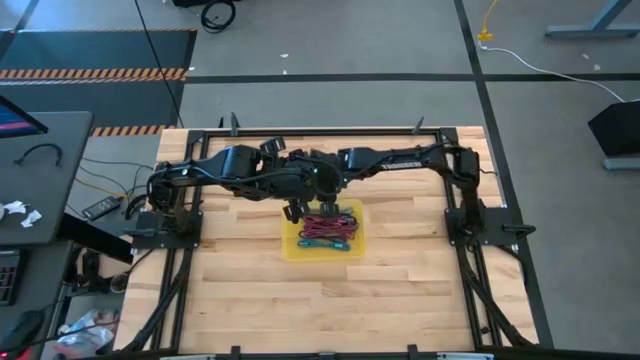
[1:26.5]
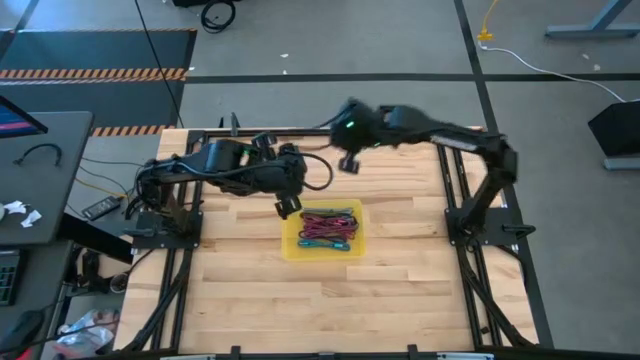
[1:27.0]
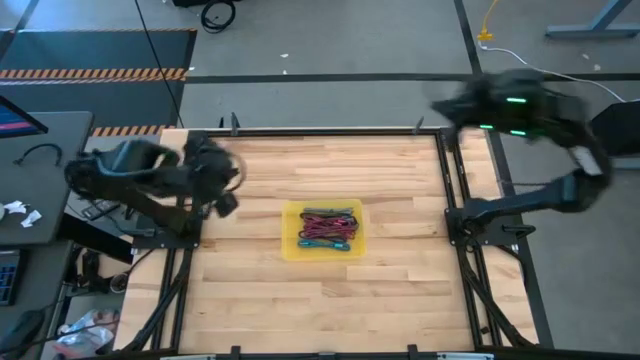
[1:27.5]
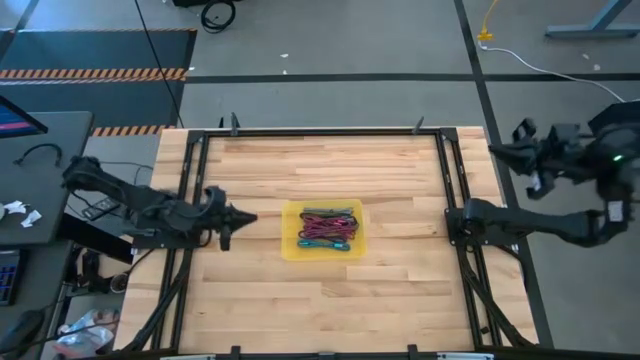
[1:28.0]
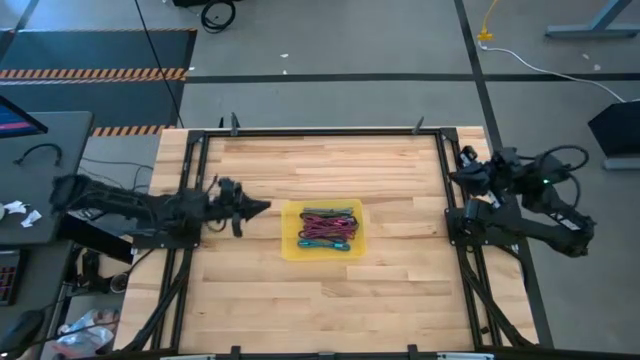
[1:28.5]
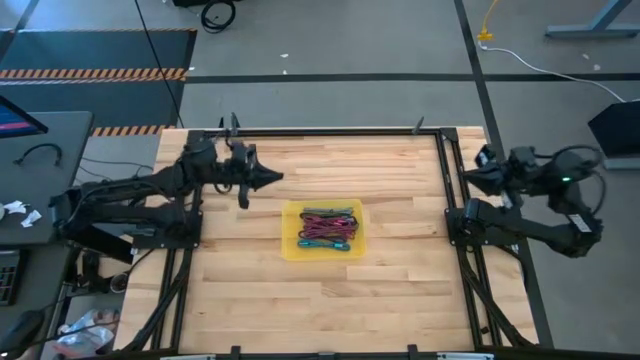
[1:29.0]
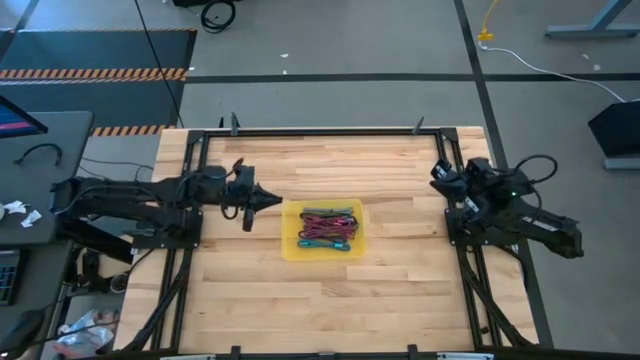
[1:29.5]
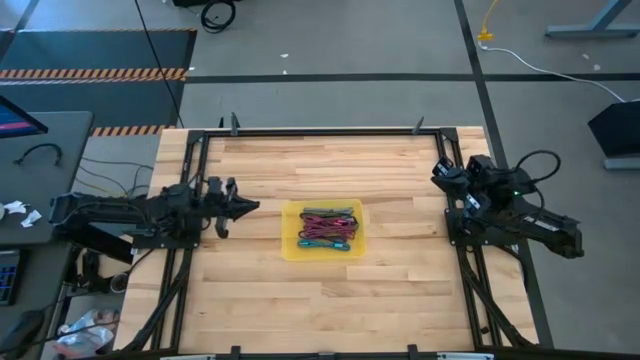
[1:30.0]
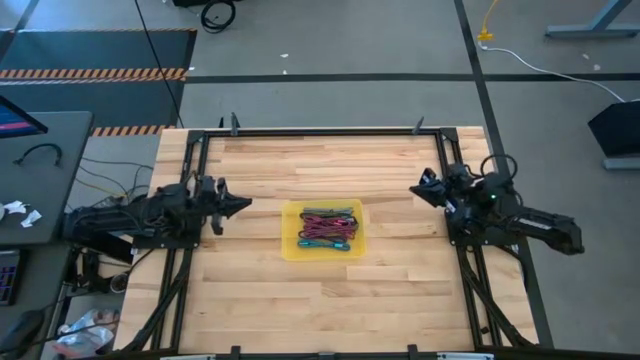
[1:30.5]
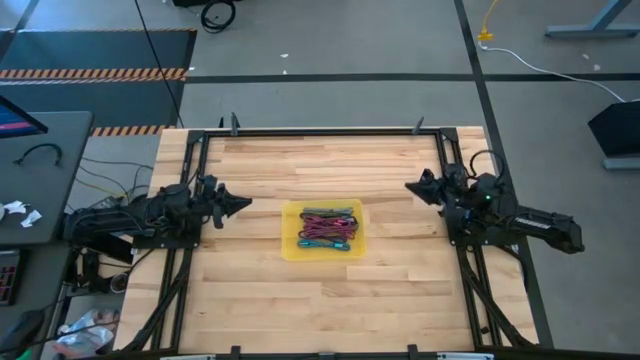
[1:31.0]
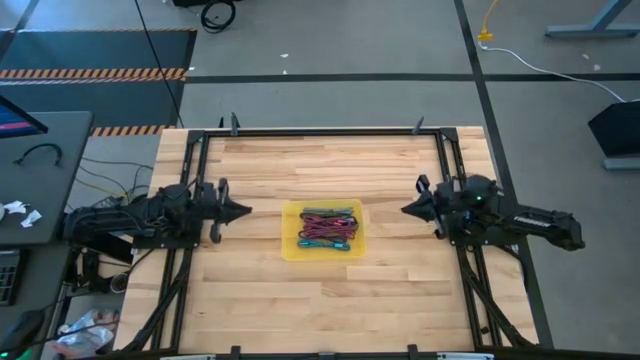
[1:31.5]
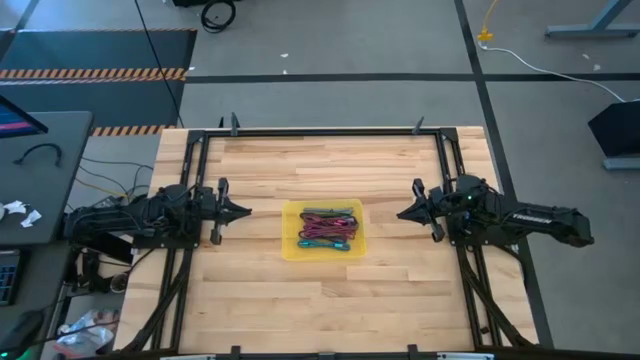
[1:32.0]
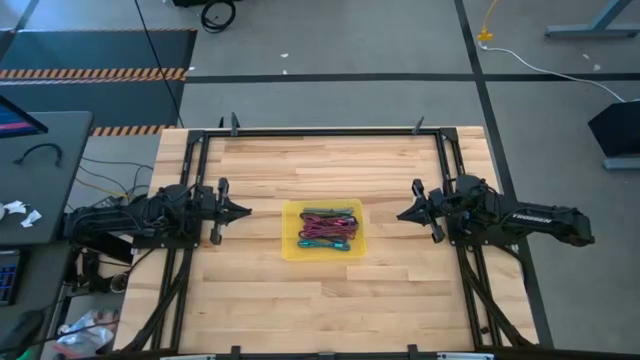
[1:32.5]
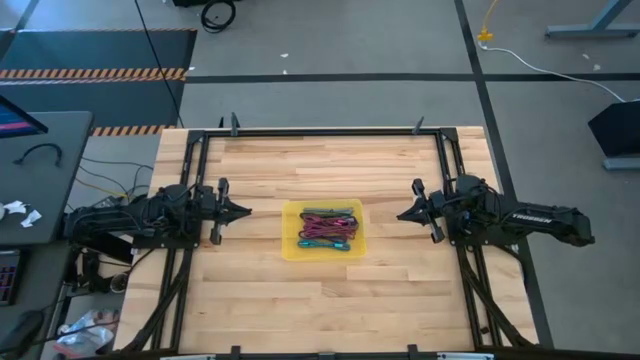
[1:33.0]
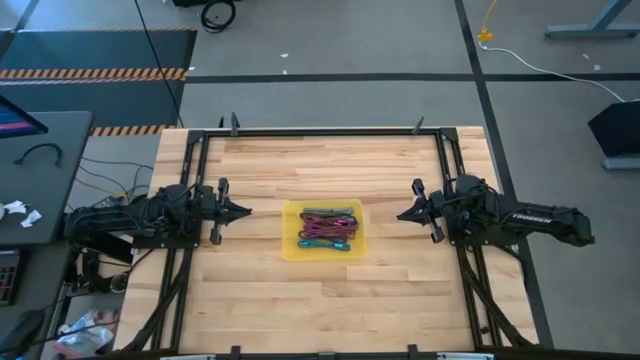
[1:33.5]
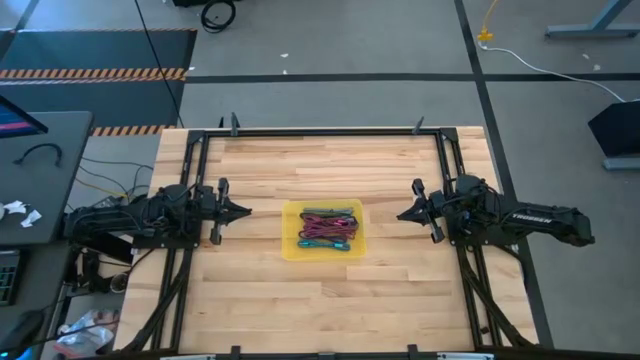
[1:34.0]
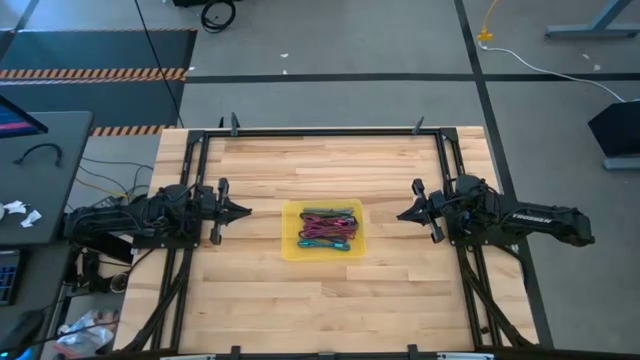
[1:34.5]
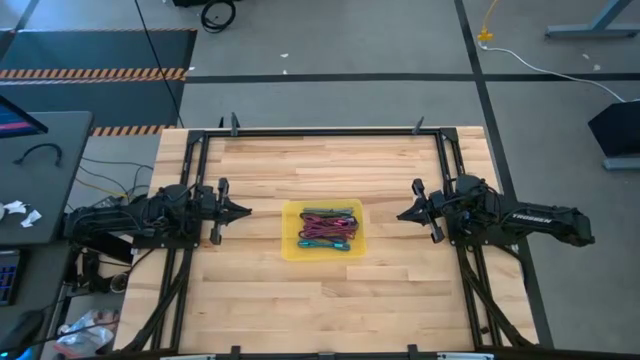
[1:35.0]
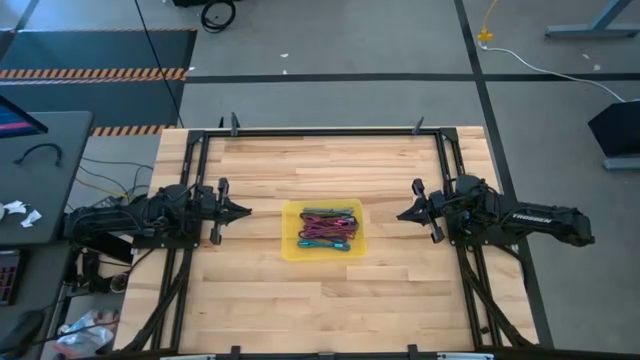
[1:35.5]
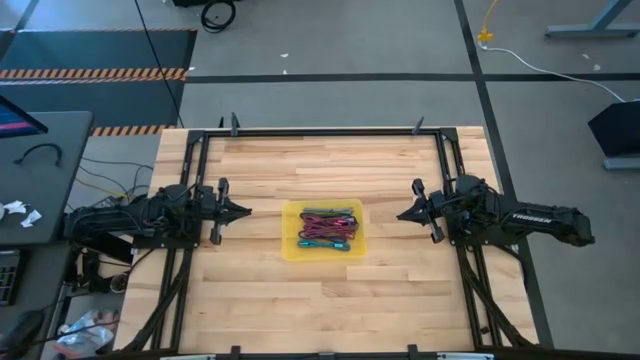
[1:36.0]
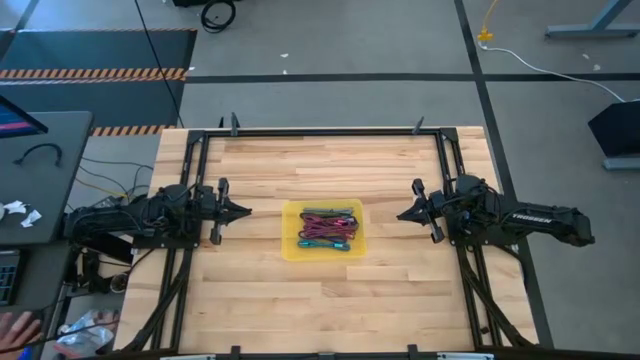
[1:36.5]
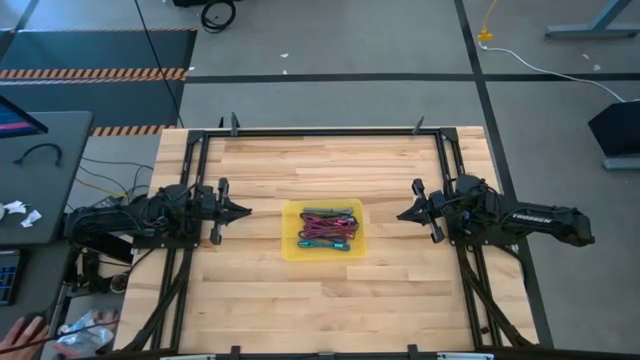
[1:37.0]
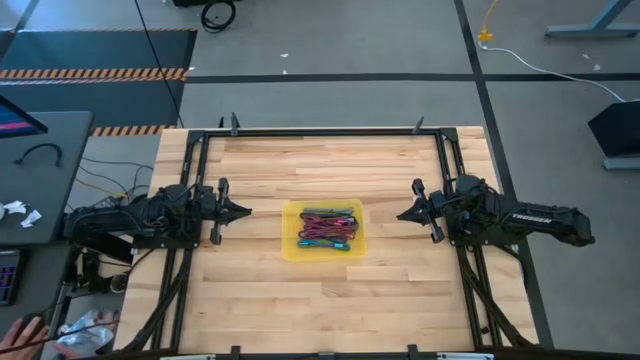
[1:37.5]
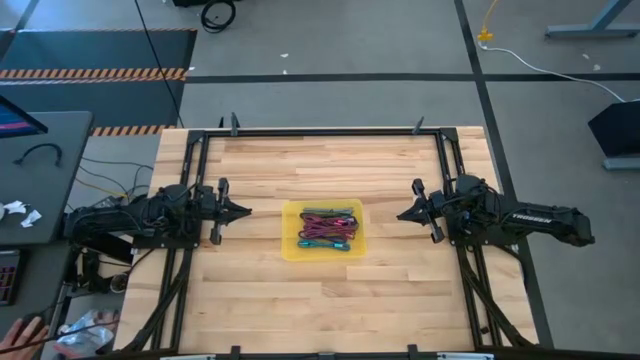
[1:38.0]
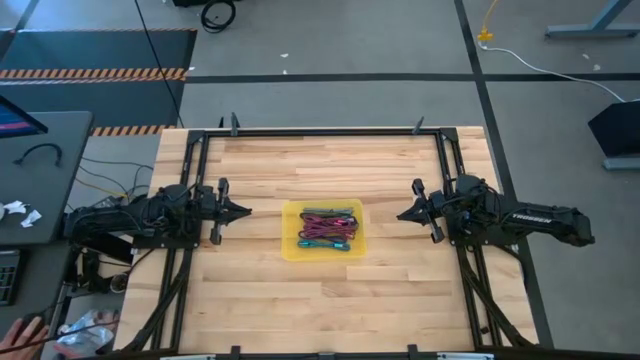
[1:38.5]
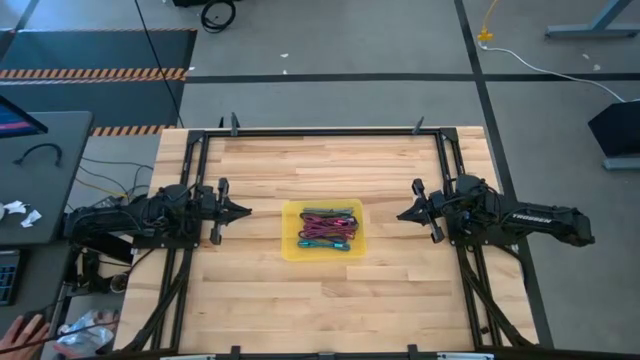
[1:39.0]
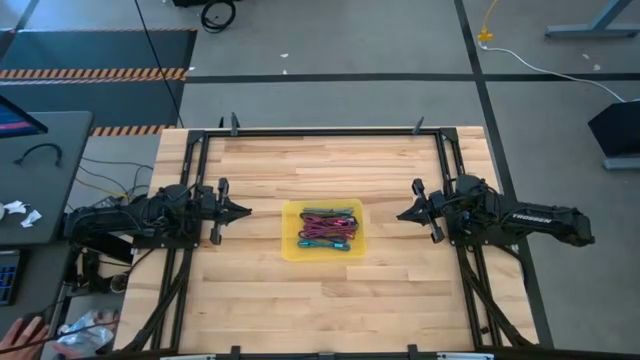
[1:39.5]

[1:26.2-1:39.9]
Task: Pick and place USB-C Cables
Return to Home Position

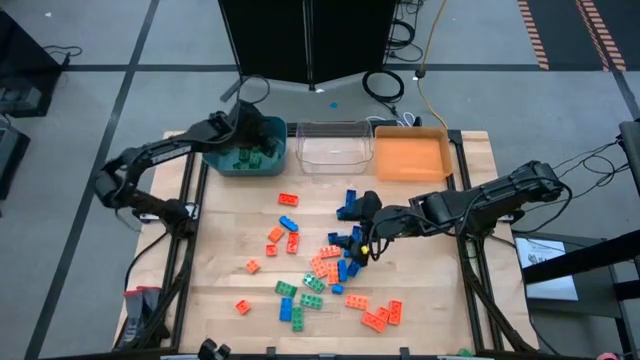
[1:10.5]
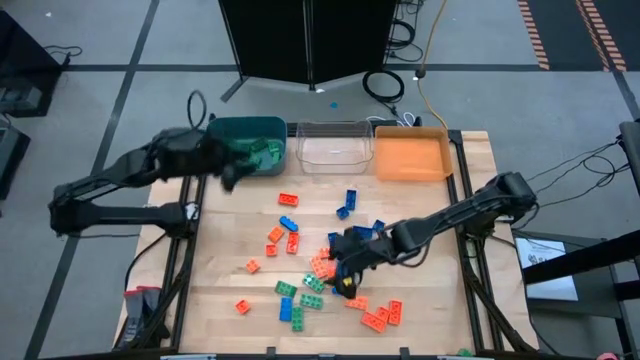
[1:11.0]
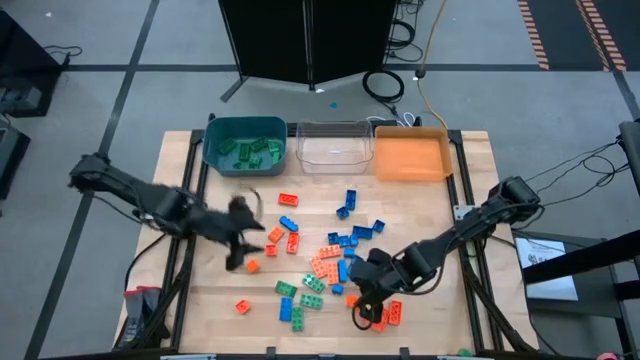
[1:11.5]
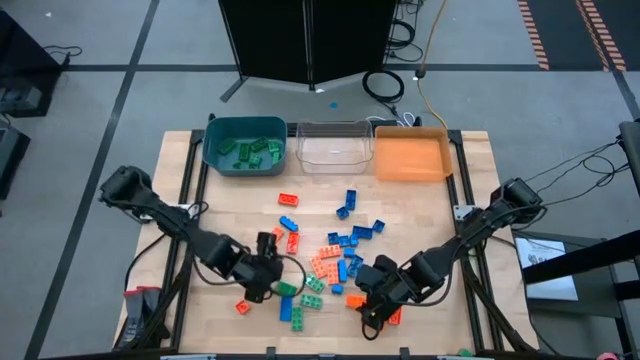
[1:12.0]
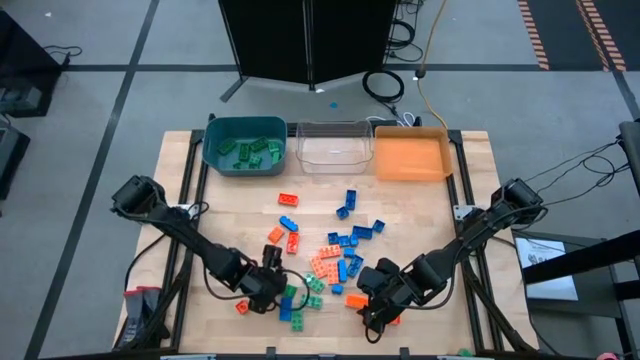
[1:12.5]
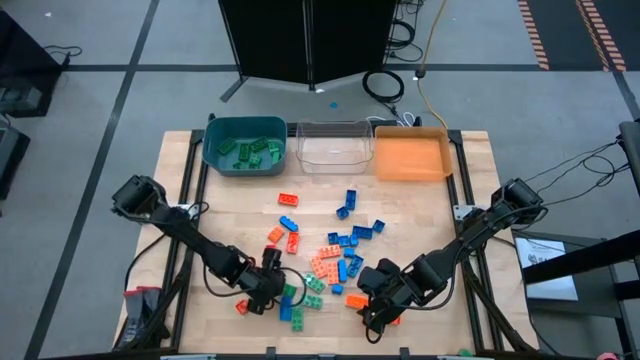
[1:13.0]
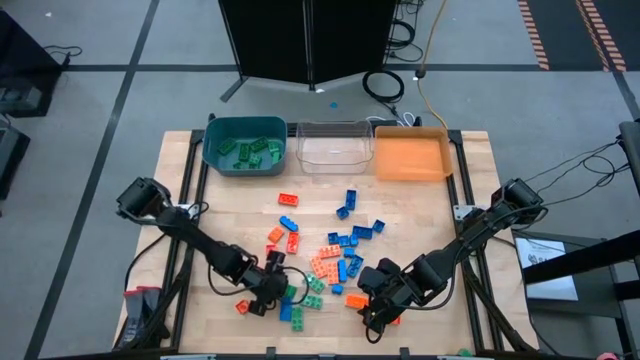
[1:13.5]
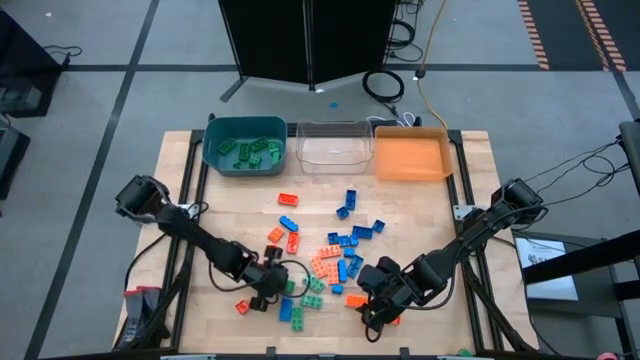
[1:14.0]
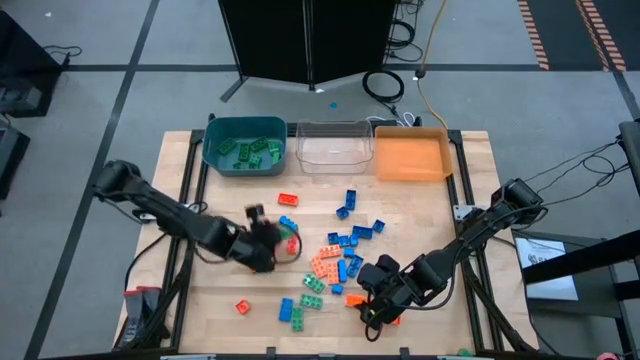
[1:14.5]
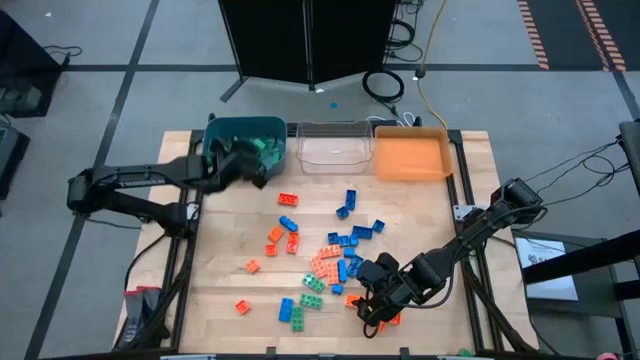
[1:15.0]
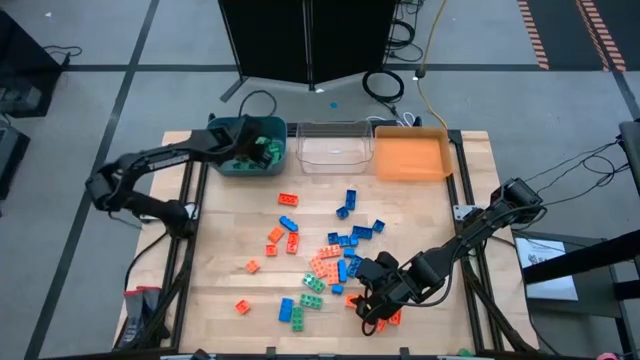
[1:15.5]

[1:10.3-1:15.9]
Task: Sort blocks
Put the green game piece into the blue bin

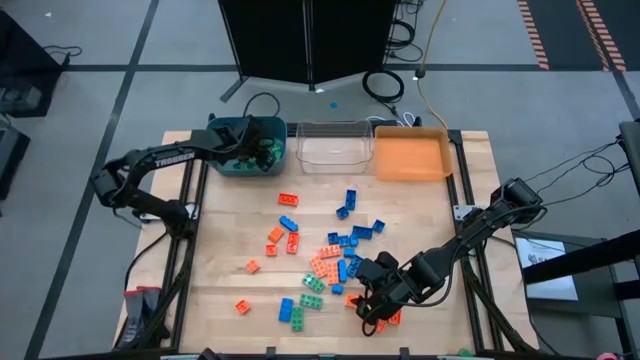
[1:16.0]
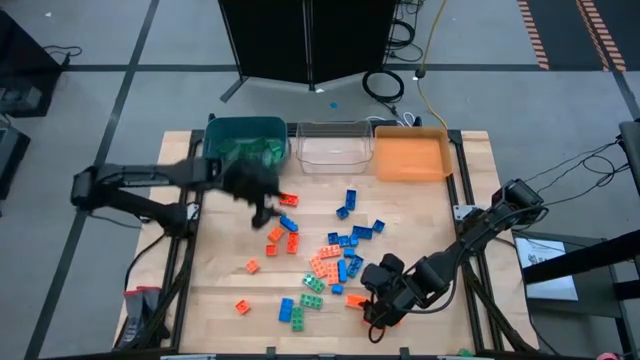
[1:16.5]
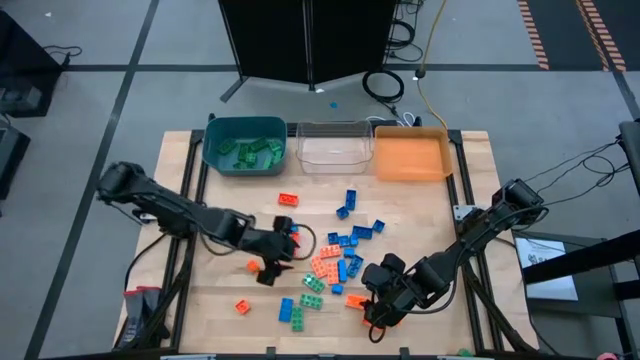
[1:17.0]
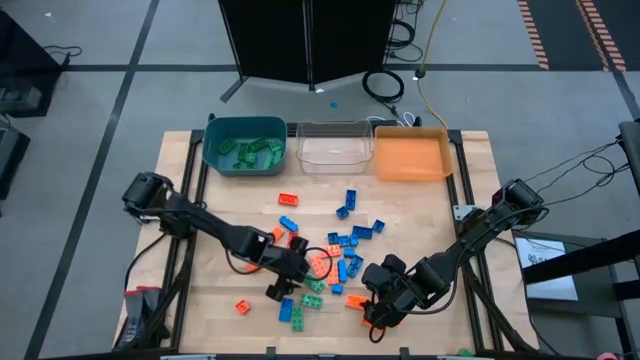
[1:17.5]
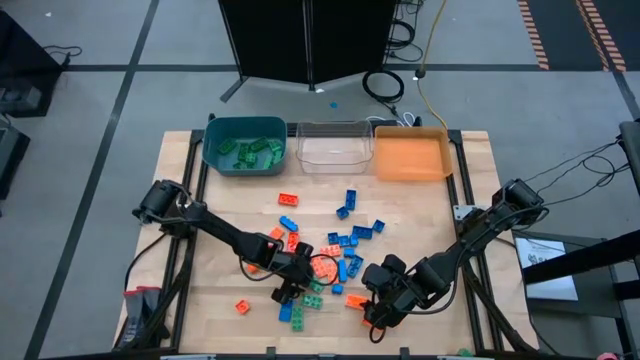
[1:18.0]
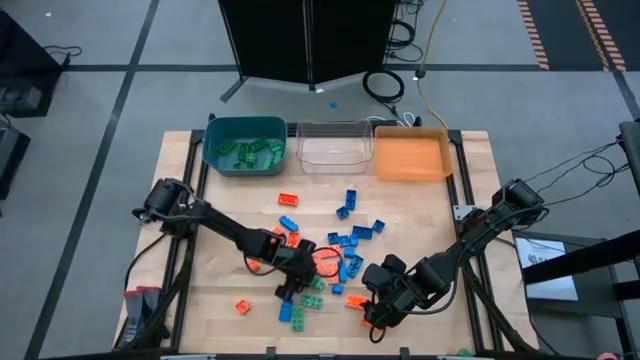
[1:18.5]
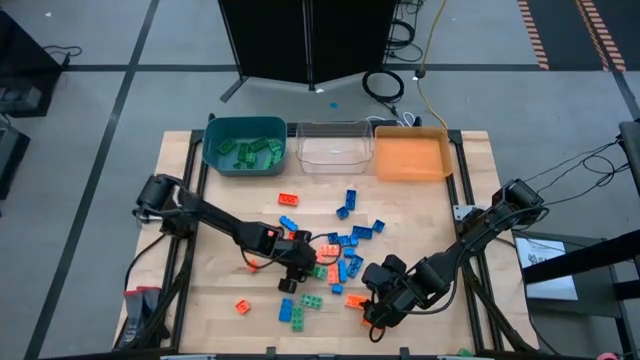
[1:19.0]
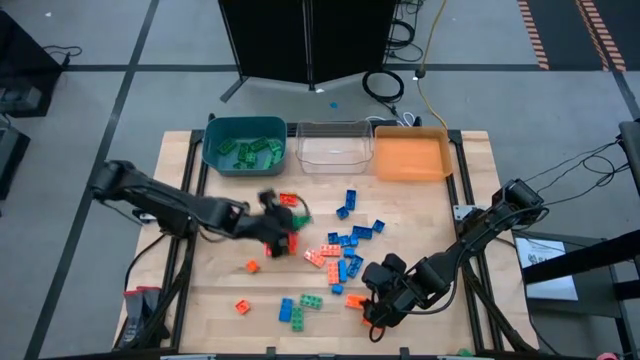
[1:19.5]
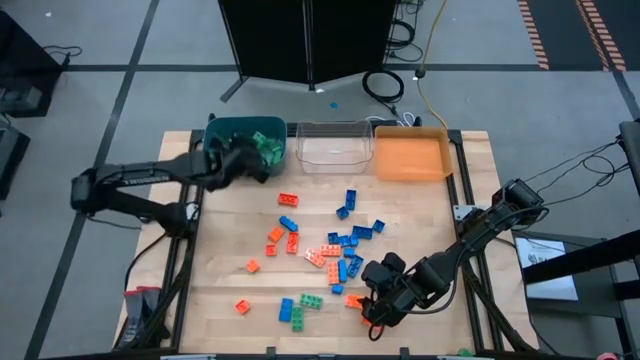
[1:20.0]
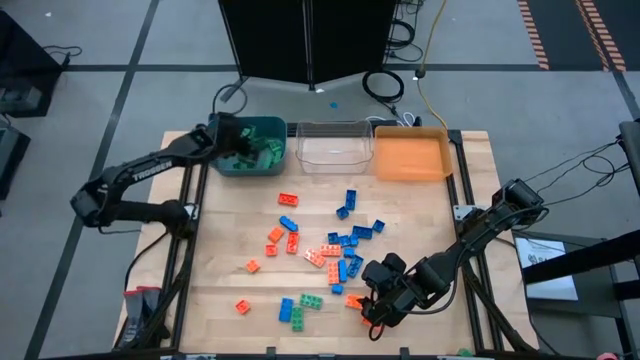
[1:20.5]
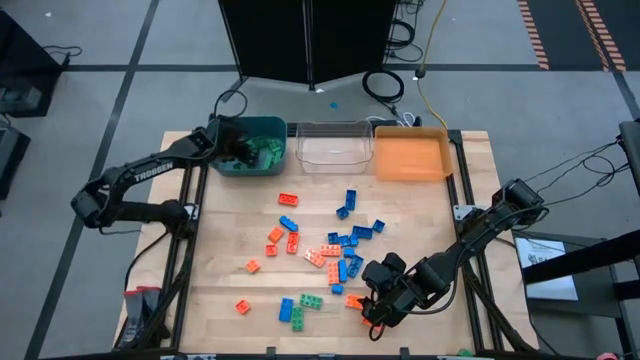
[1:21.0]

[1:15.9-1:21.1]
Put the green game piece into the blue bin
